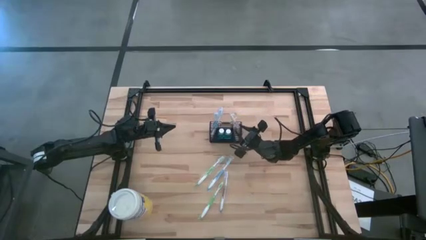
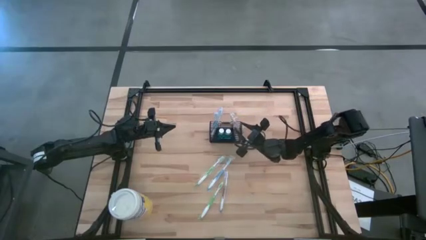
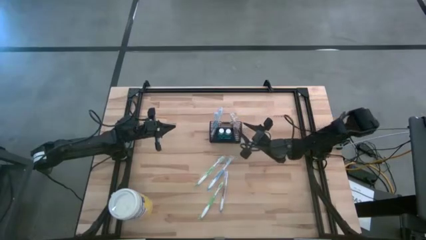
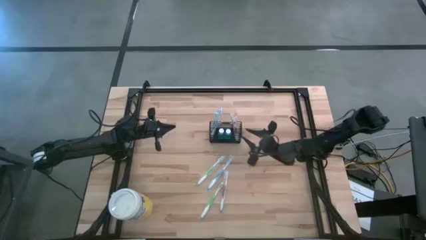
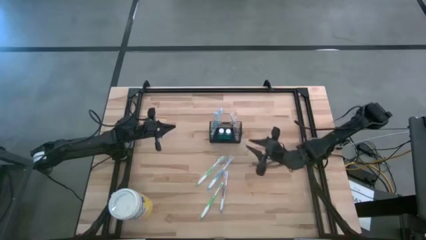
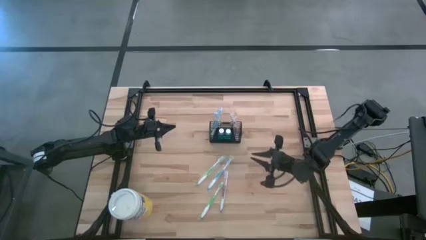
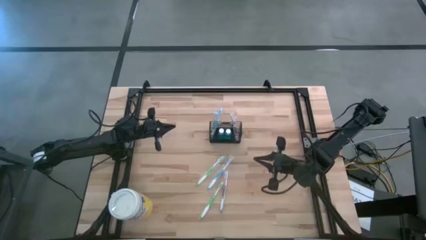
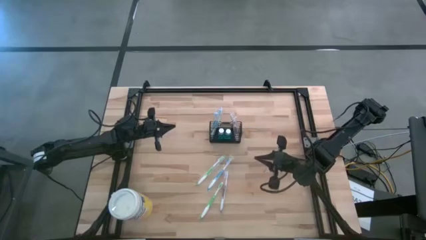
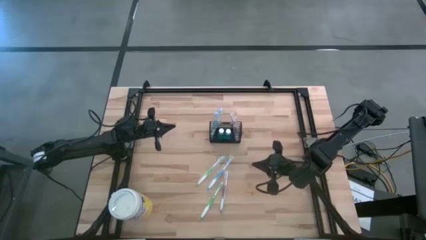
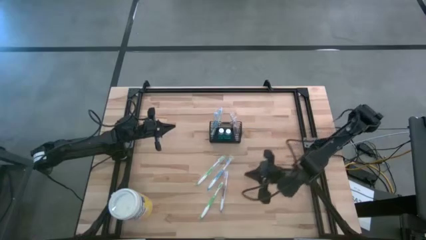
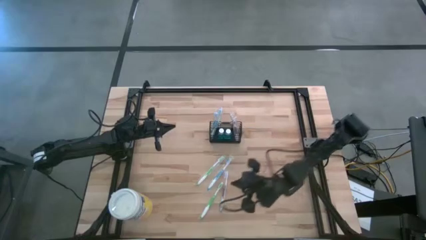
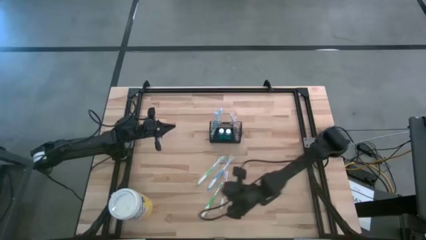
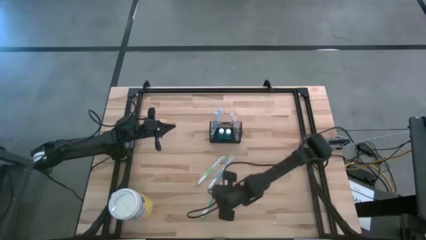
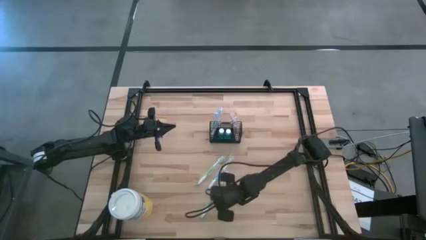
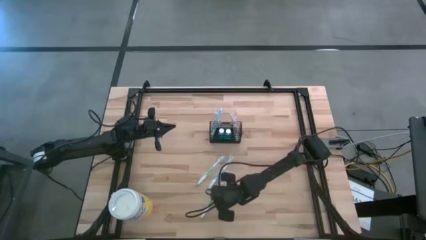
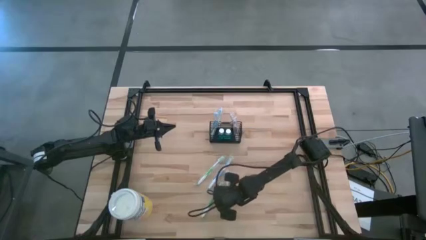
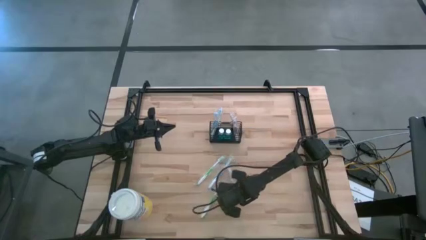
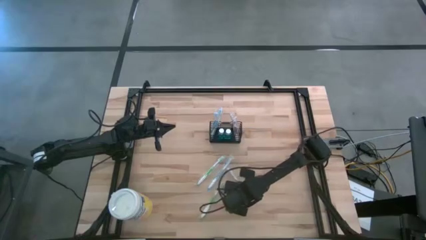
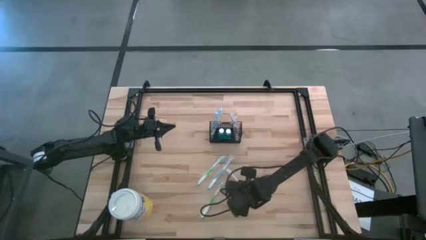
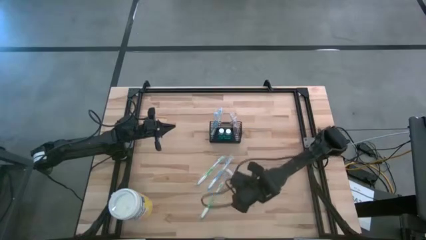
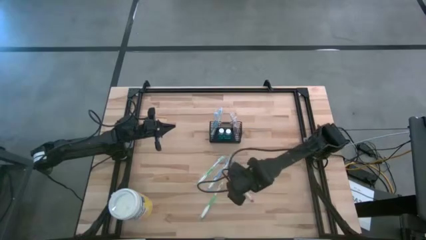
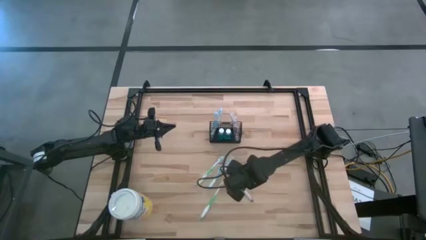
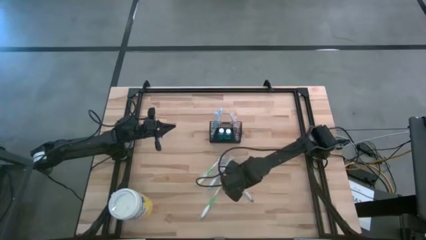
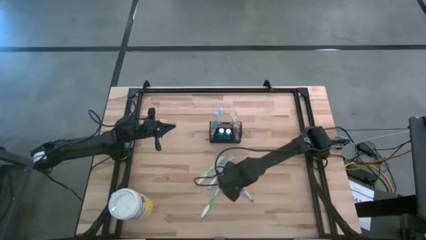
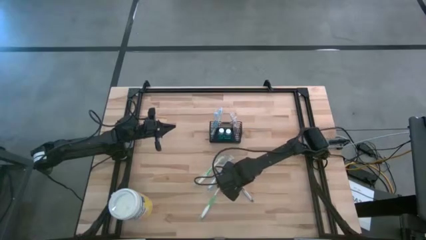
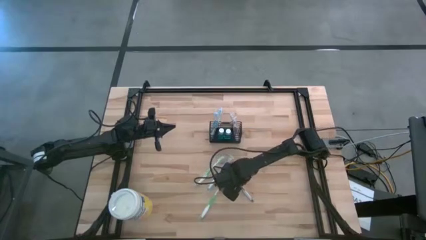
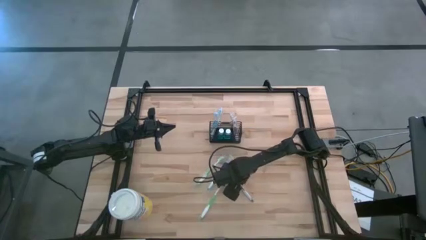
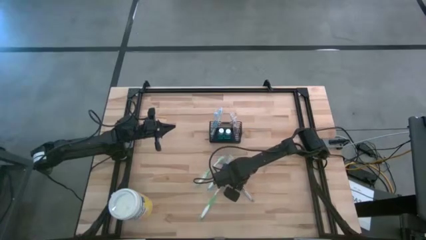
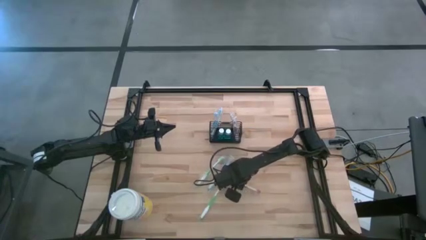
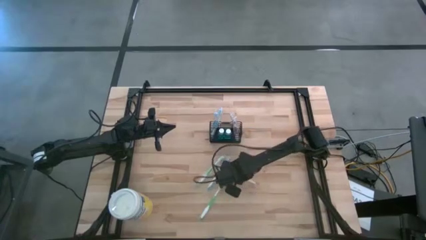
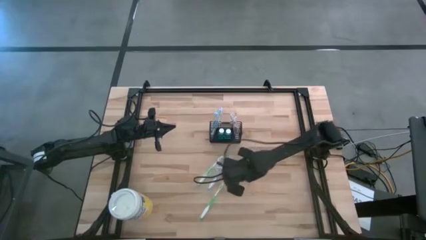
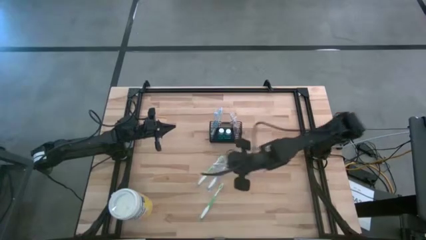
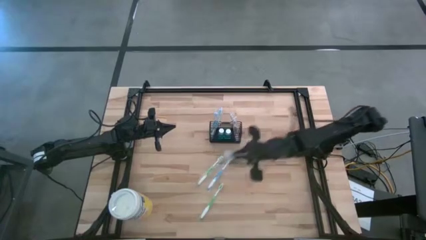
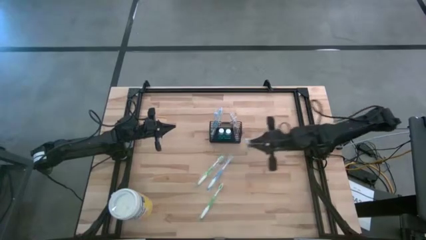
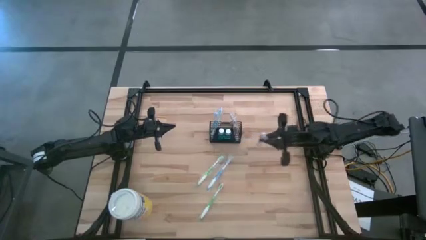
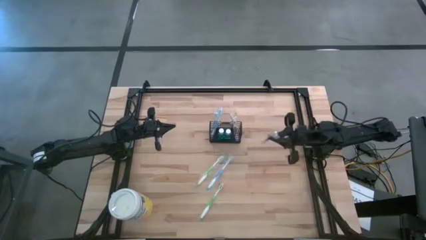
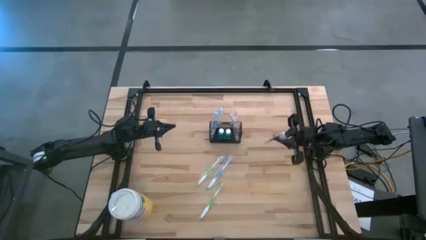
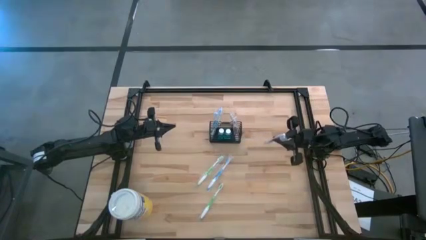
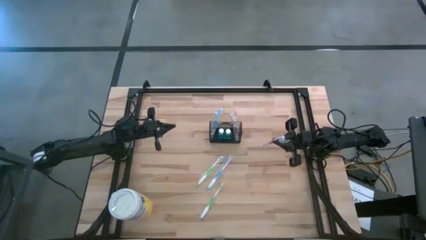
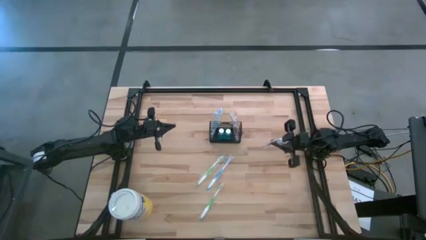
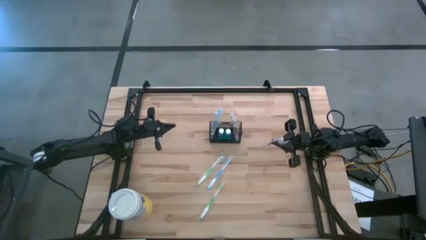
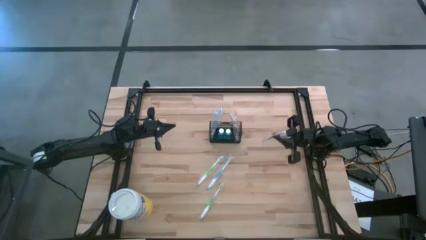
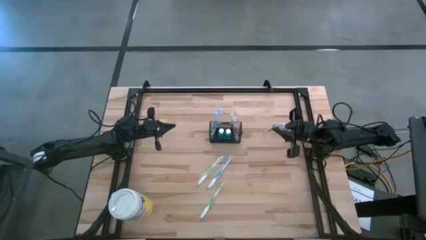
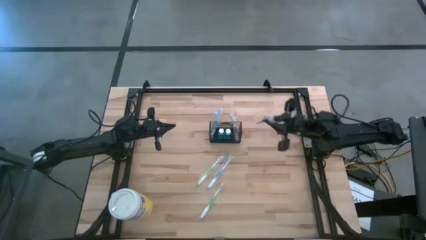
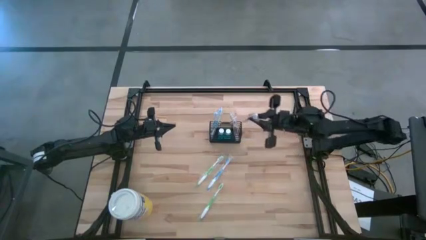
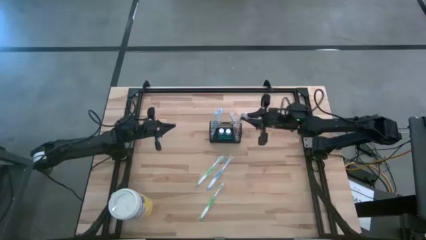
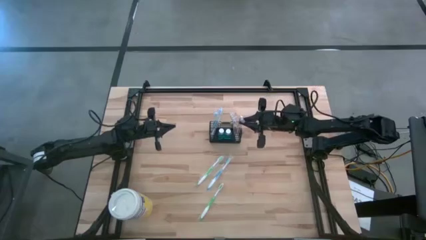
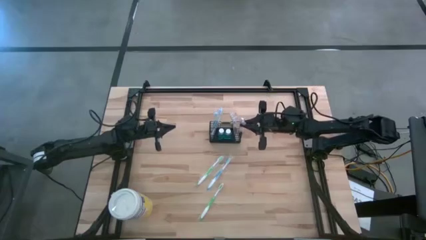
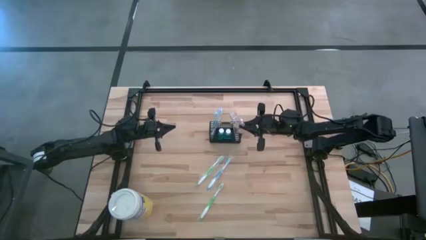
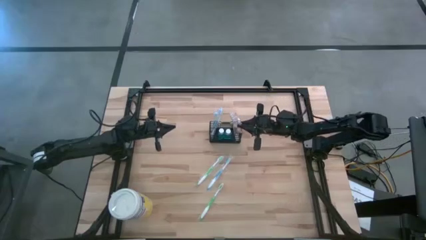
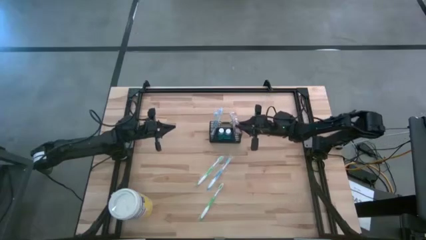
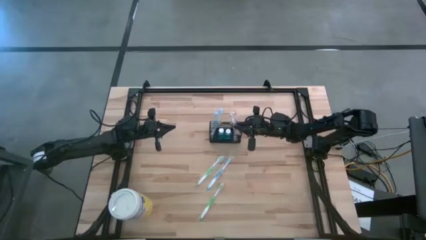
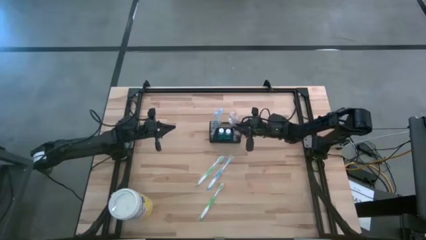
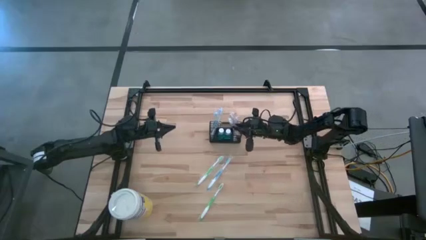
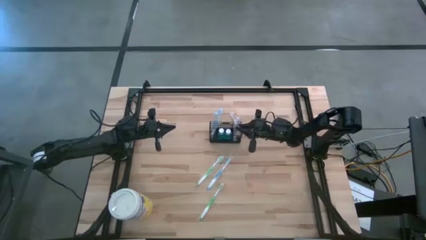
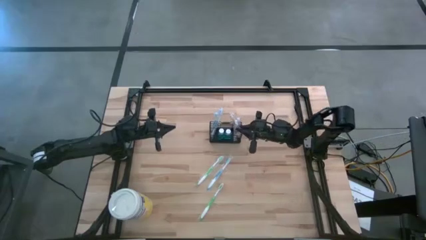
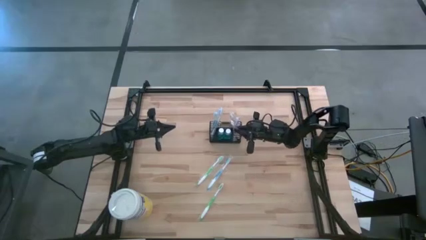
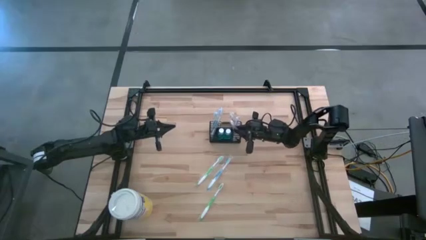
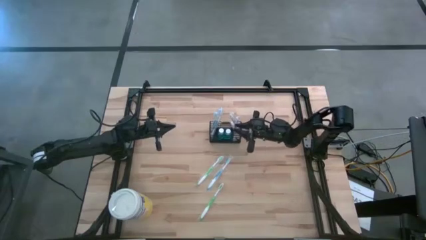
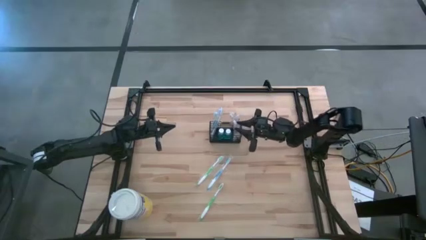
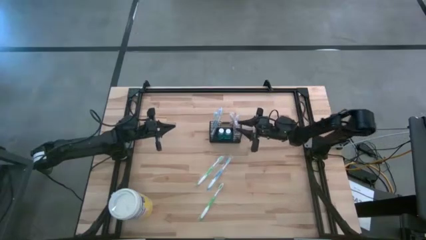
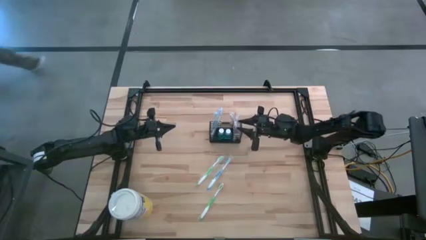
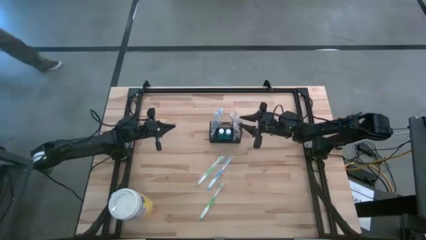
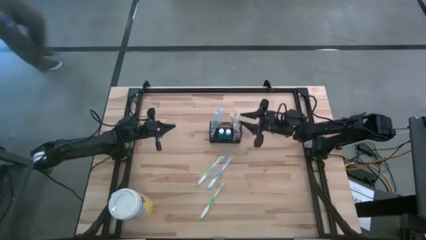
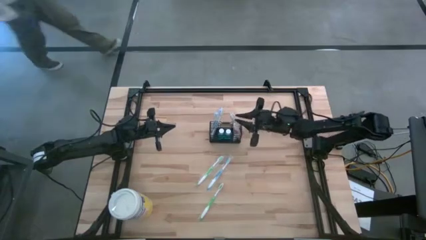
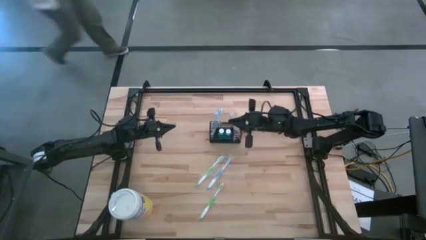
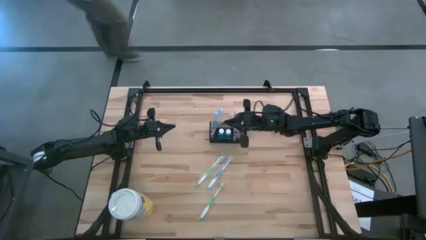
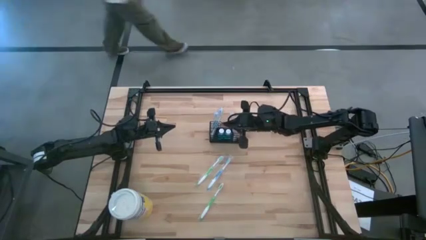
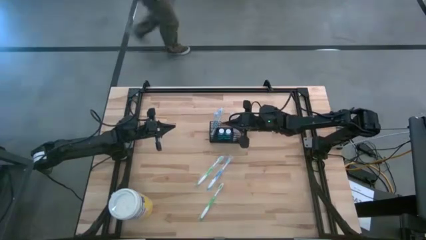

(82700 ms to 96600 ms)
Task: Pick & Place toothbrushing station
Put the purple toothbrush into the wire organizer

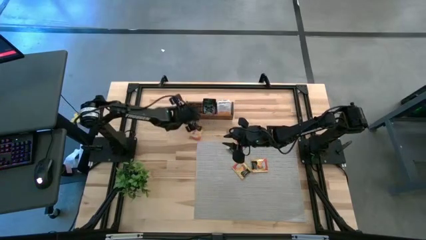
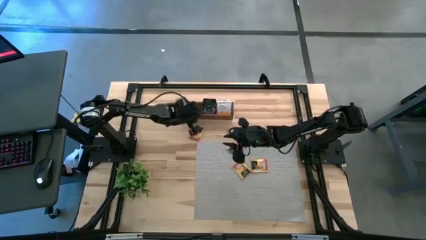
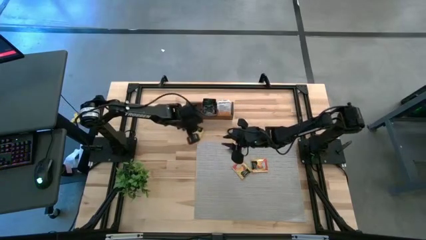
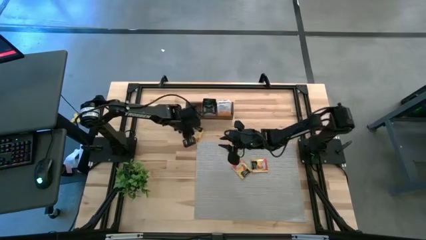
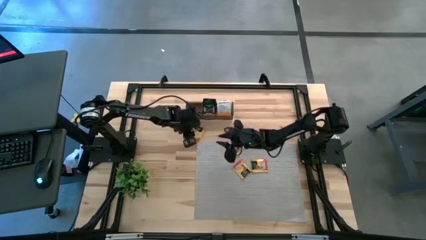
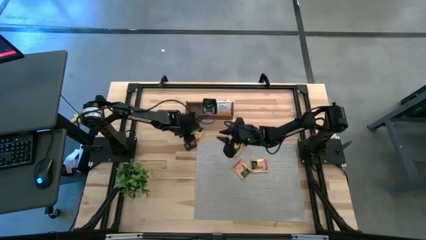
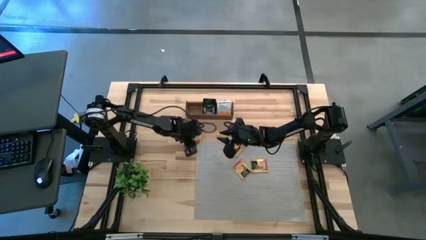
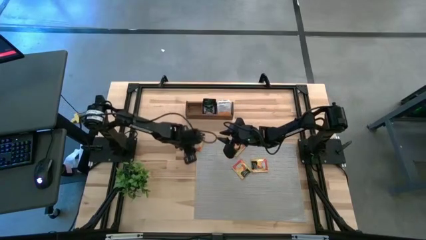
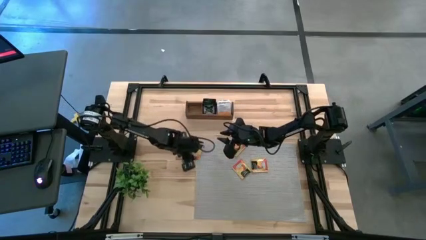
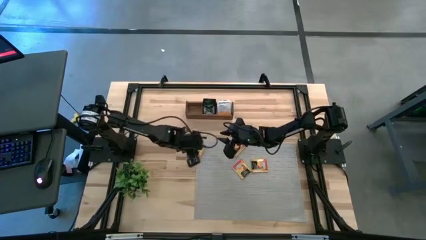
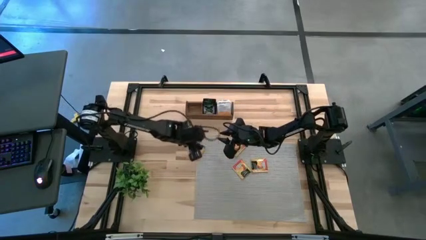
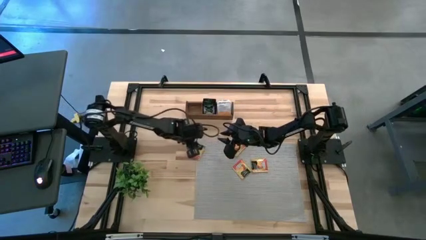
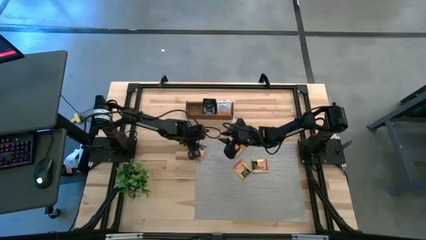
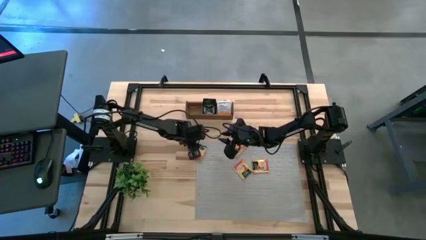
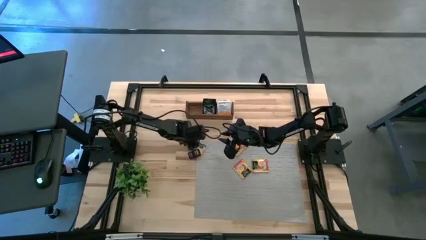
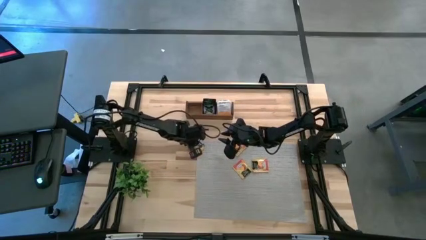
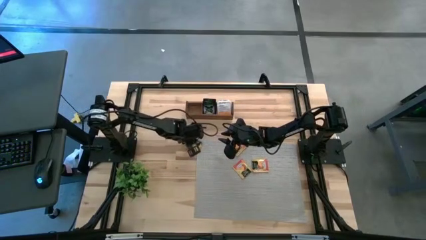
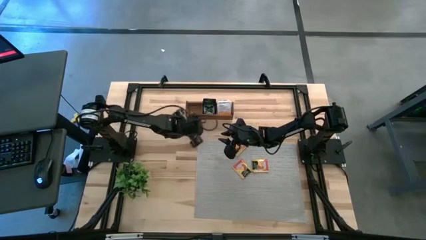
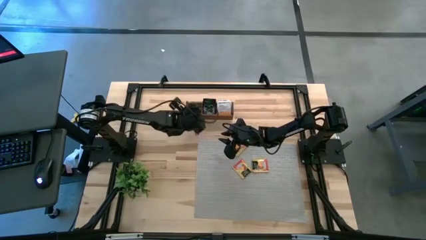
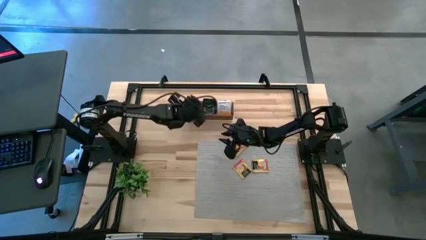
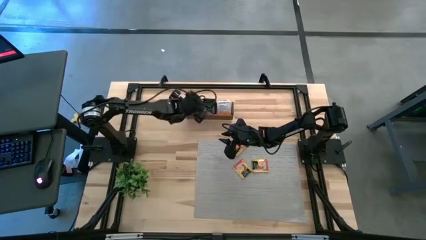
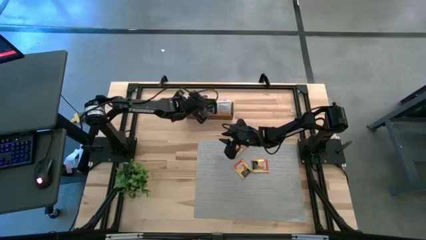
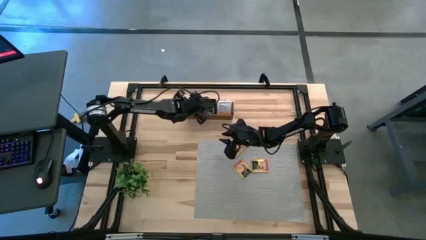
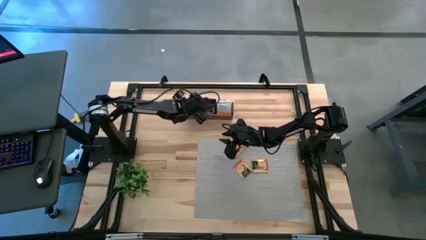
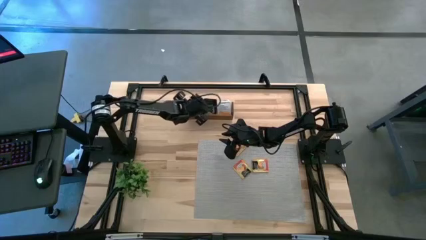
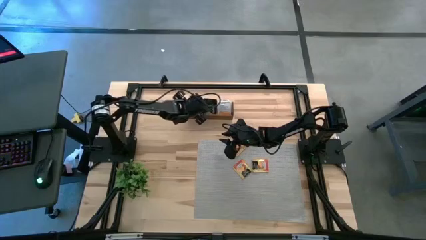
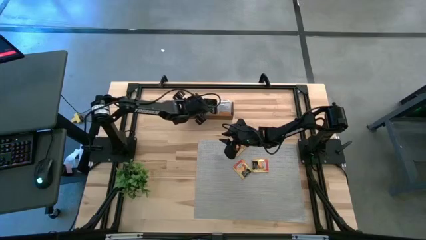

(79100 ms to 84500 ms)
Task: Pick & Place Tea
Put the orange tea bag into the left section of the wooden organizer
